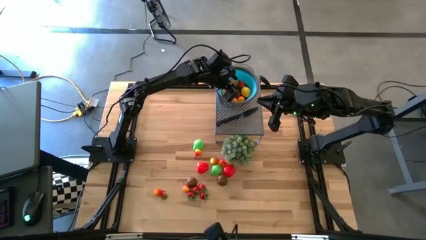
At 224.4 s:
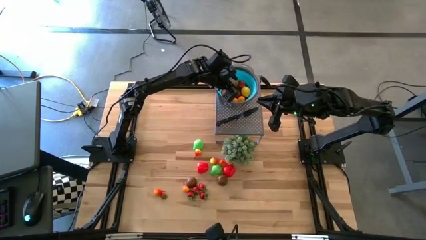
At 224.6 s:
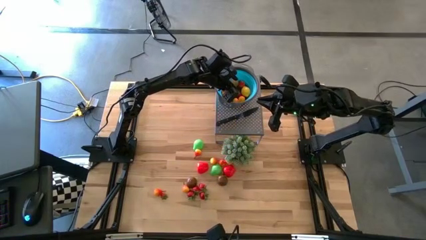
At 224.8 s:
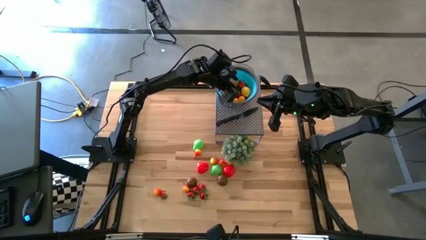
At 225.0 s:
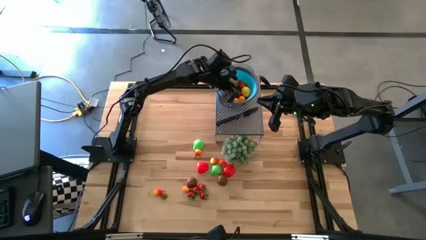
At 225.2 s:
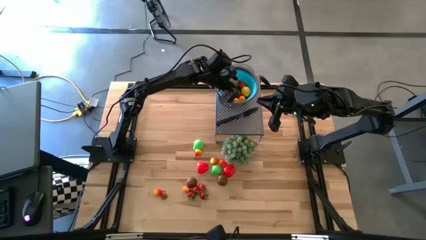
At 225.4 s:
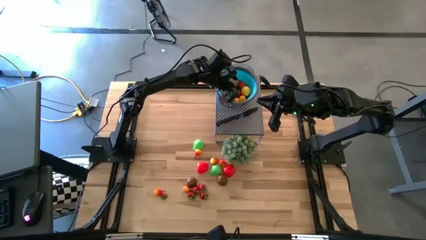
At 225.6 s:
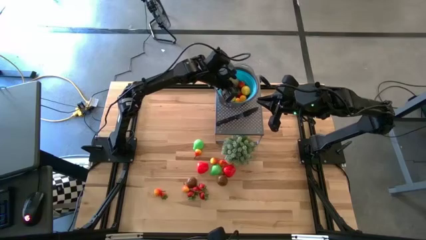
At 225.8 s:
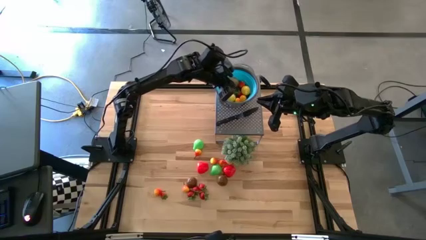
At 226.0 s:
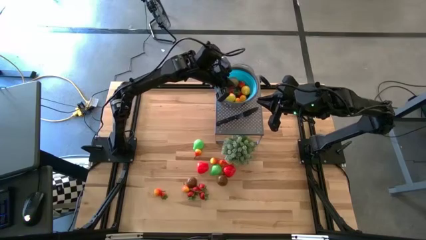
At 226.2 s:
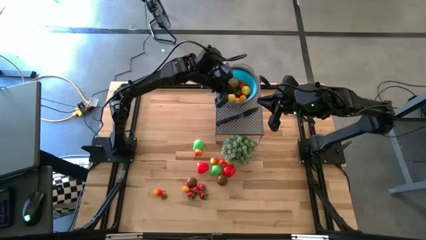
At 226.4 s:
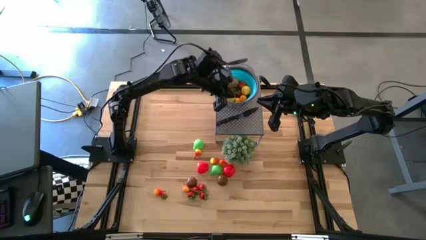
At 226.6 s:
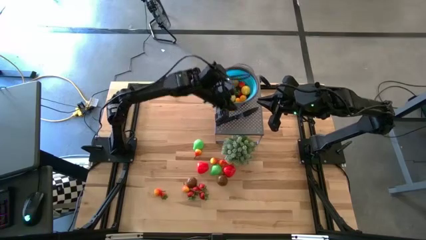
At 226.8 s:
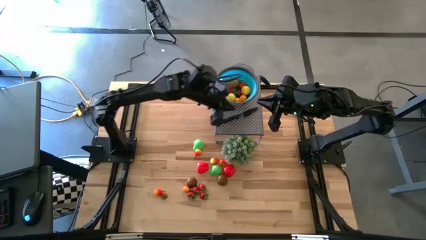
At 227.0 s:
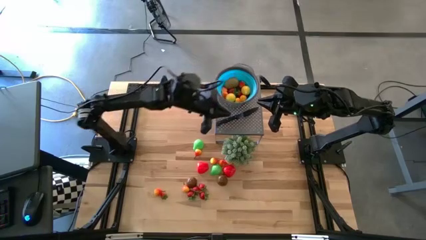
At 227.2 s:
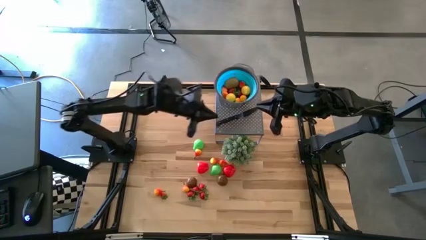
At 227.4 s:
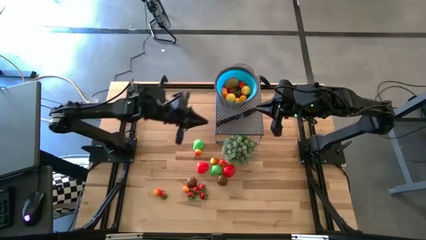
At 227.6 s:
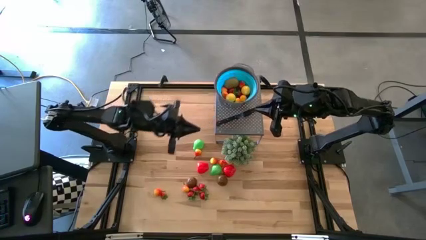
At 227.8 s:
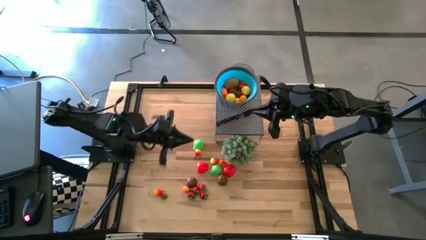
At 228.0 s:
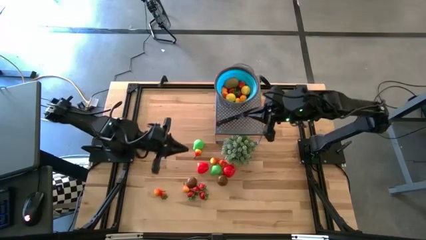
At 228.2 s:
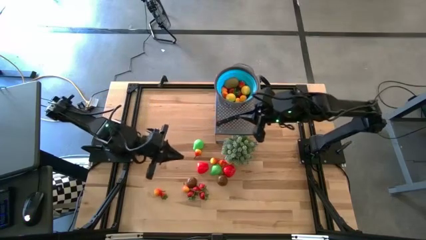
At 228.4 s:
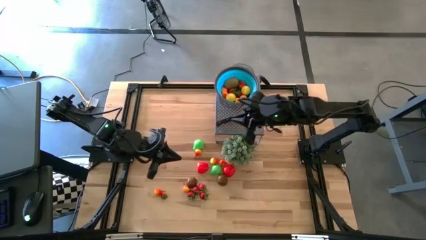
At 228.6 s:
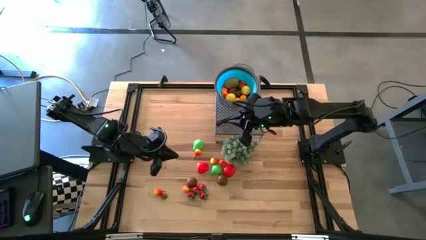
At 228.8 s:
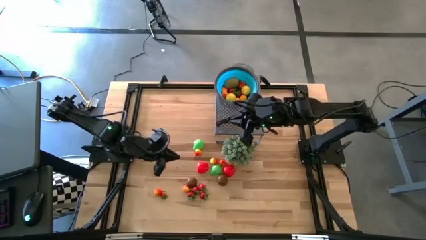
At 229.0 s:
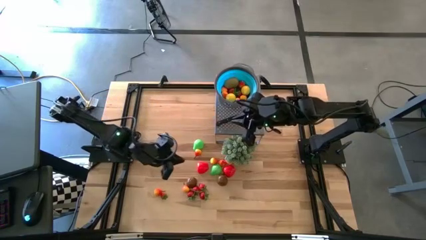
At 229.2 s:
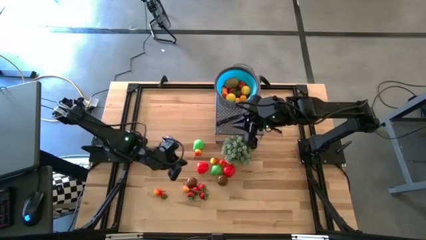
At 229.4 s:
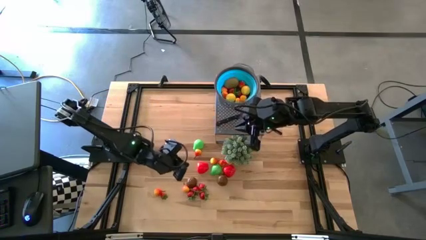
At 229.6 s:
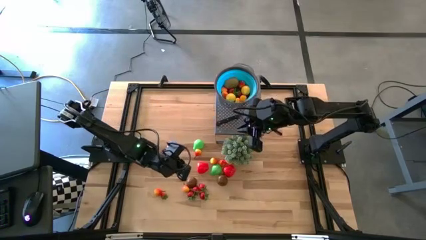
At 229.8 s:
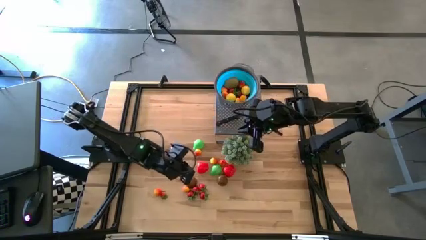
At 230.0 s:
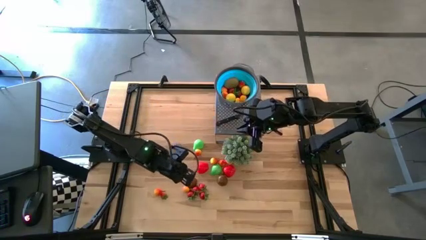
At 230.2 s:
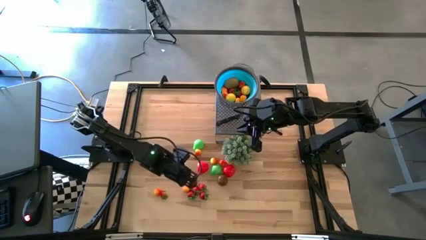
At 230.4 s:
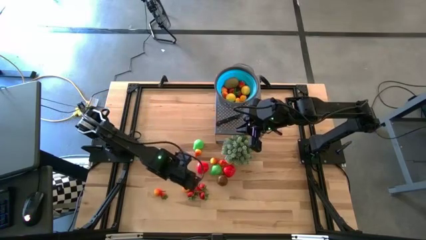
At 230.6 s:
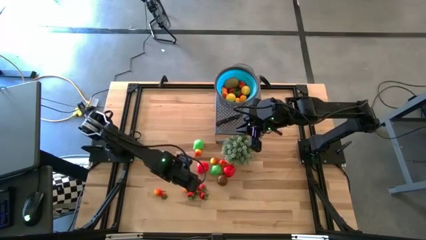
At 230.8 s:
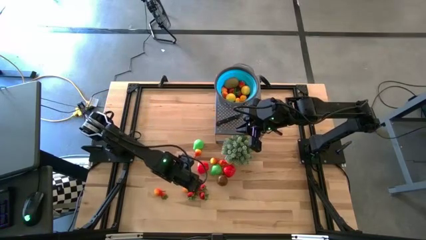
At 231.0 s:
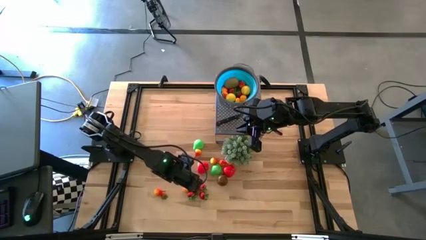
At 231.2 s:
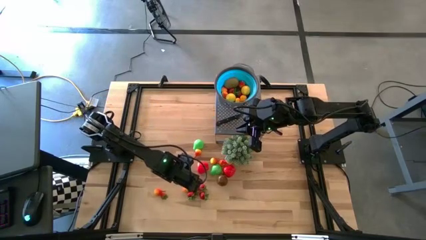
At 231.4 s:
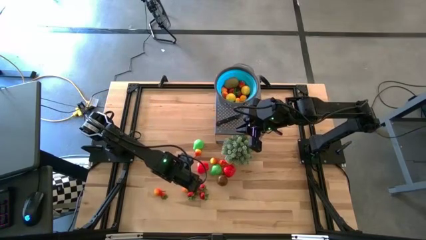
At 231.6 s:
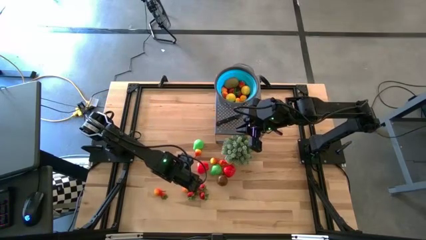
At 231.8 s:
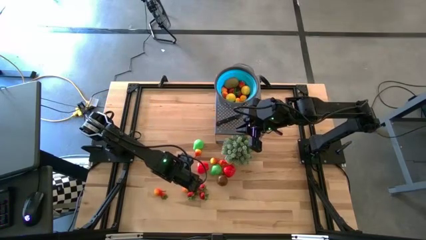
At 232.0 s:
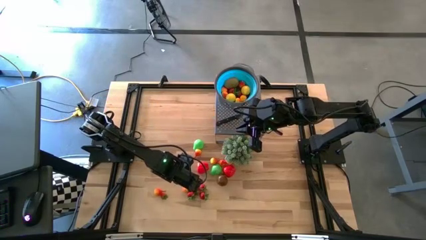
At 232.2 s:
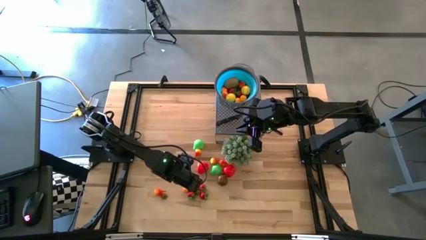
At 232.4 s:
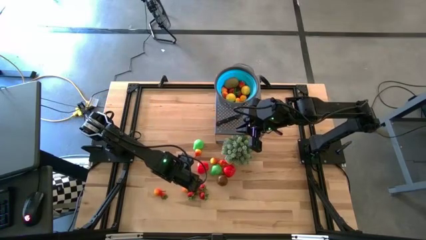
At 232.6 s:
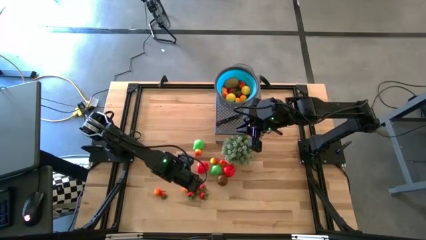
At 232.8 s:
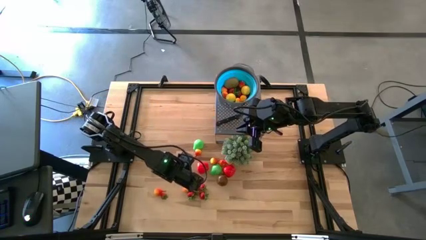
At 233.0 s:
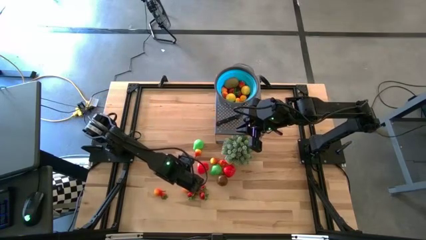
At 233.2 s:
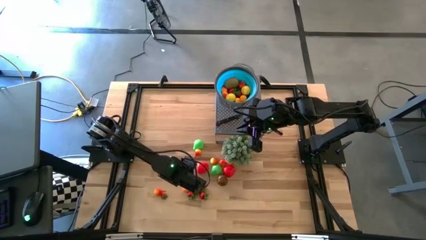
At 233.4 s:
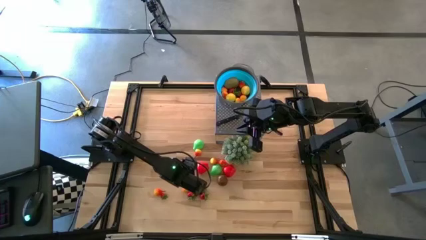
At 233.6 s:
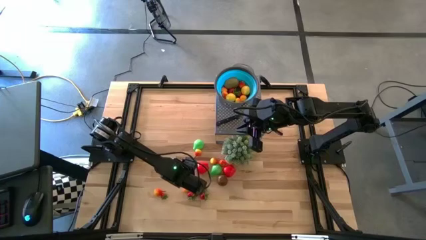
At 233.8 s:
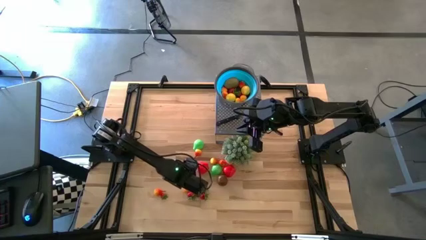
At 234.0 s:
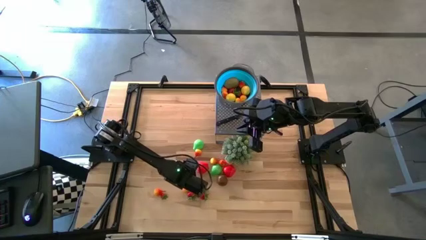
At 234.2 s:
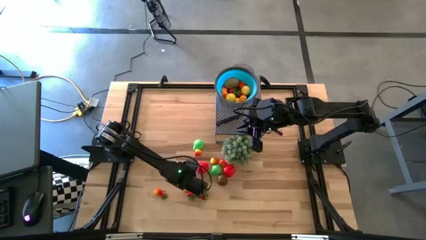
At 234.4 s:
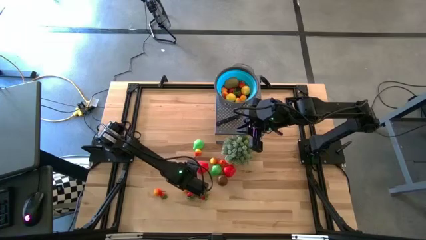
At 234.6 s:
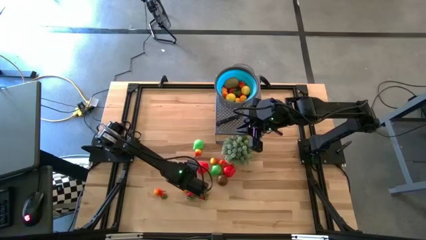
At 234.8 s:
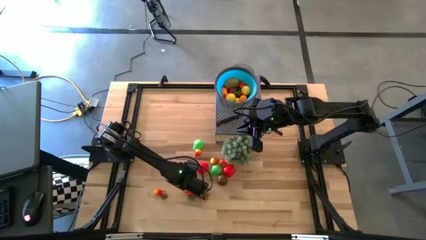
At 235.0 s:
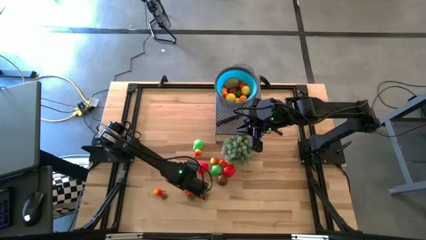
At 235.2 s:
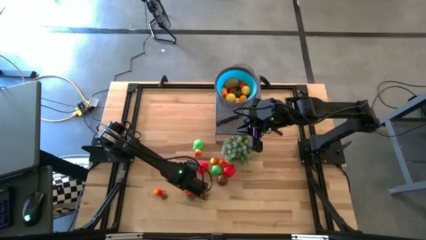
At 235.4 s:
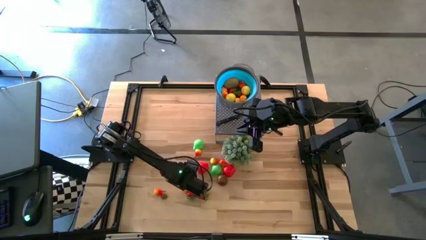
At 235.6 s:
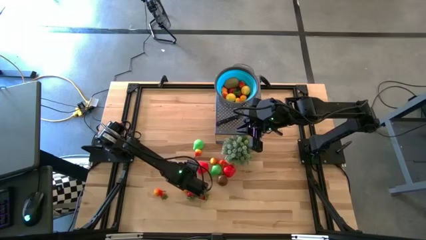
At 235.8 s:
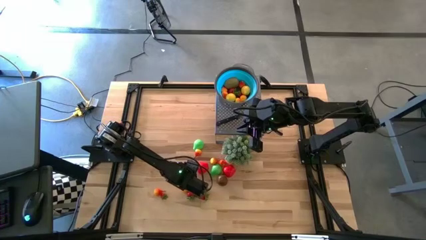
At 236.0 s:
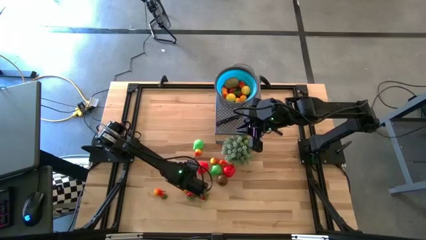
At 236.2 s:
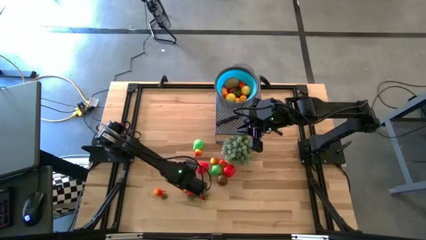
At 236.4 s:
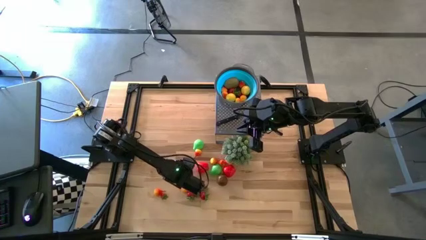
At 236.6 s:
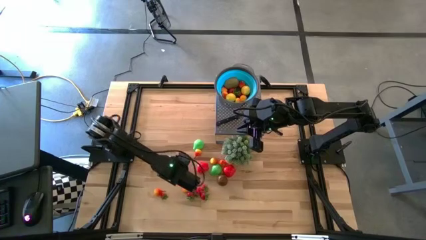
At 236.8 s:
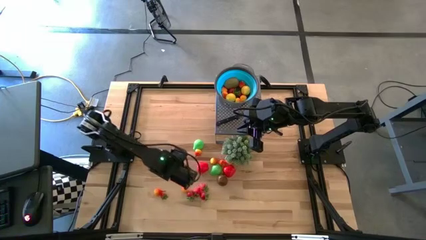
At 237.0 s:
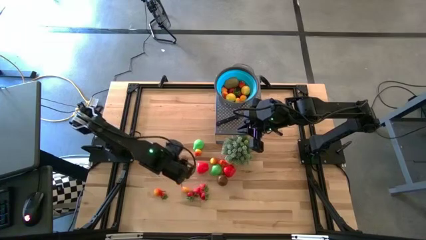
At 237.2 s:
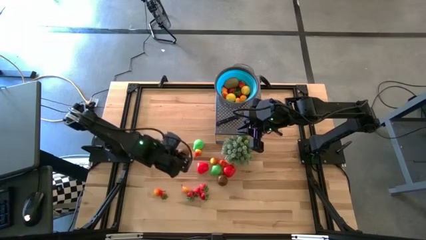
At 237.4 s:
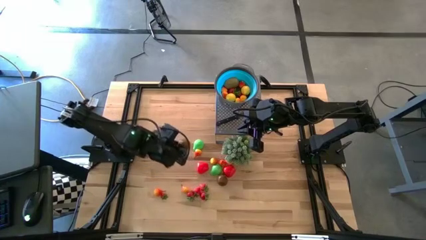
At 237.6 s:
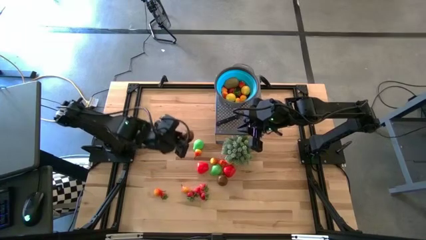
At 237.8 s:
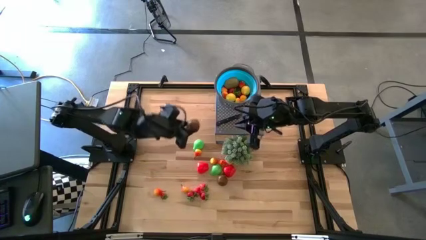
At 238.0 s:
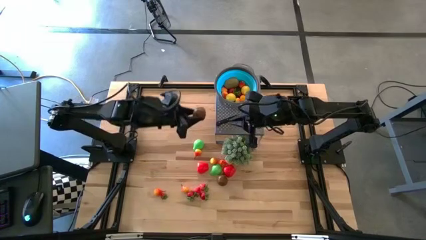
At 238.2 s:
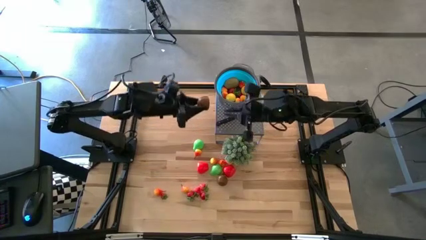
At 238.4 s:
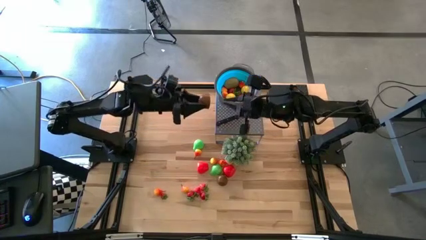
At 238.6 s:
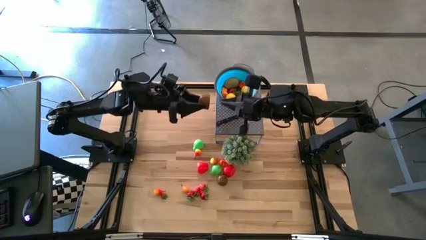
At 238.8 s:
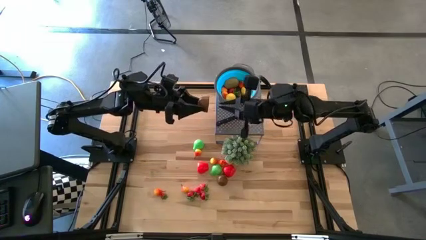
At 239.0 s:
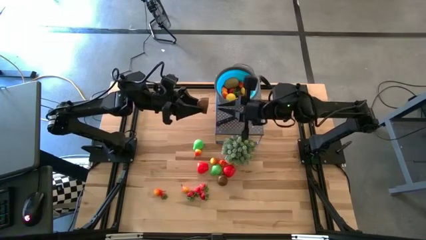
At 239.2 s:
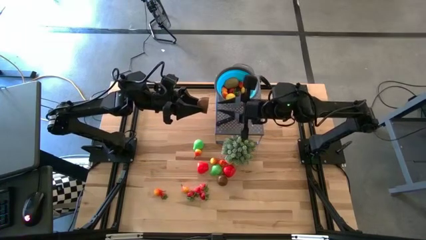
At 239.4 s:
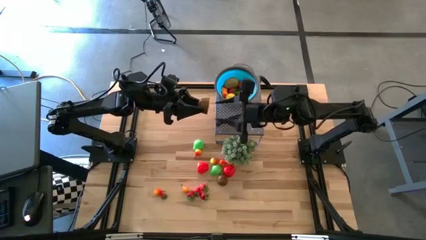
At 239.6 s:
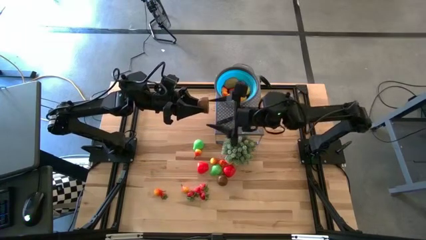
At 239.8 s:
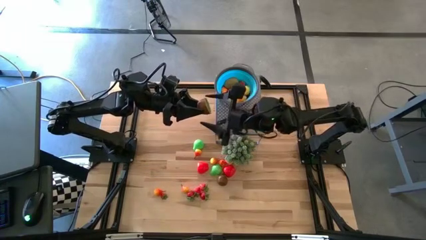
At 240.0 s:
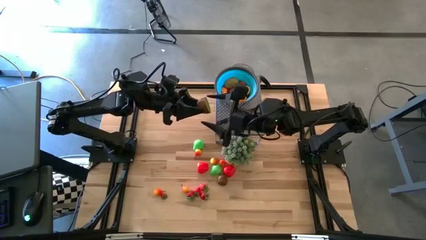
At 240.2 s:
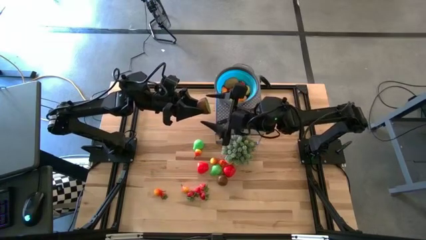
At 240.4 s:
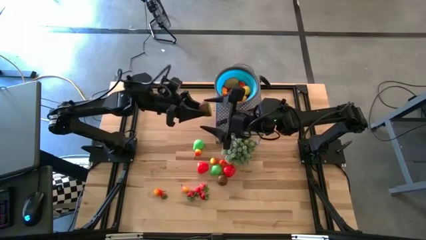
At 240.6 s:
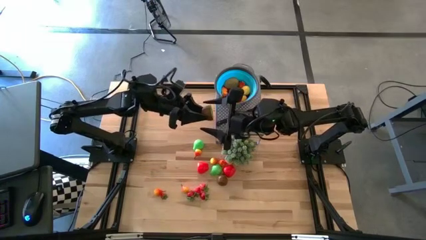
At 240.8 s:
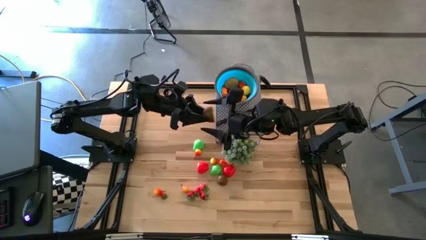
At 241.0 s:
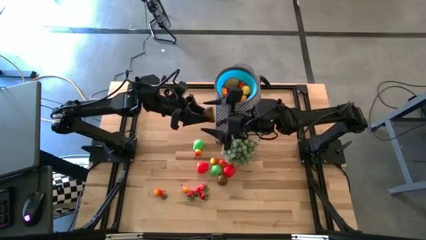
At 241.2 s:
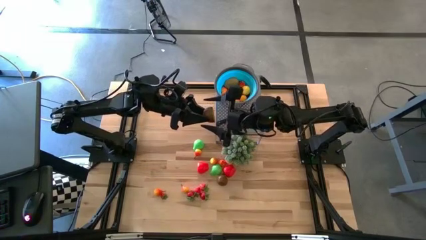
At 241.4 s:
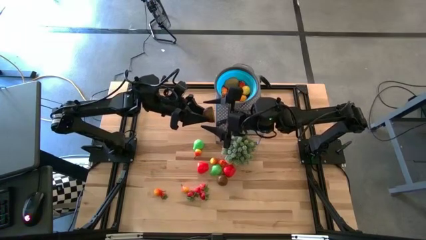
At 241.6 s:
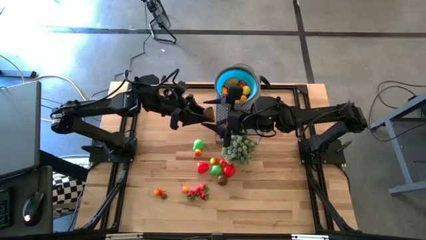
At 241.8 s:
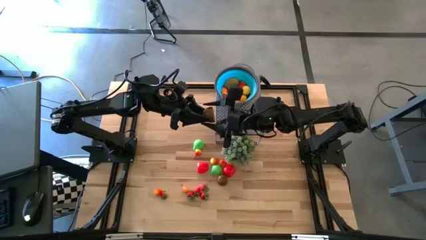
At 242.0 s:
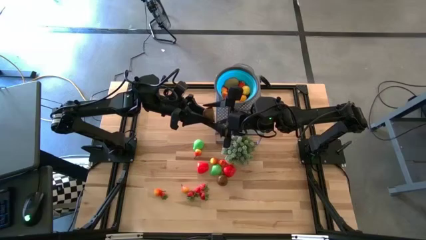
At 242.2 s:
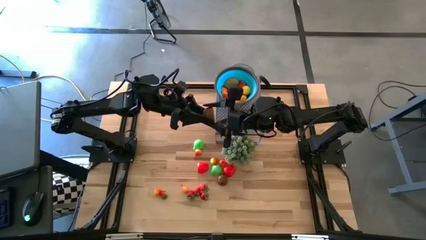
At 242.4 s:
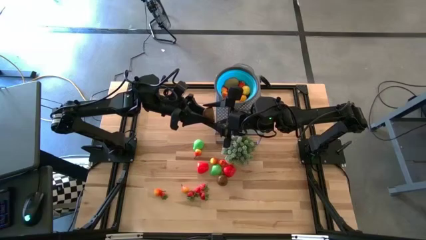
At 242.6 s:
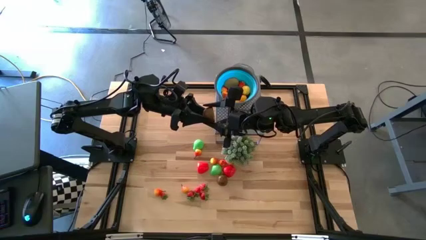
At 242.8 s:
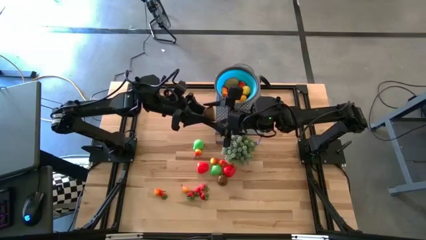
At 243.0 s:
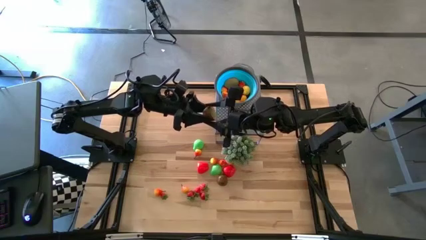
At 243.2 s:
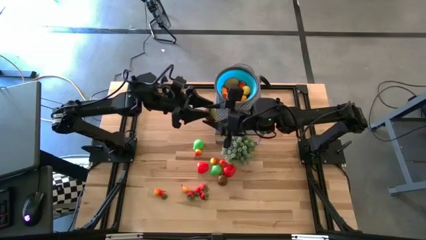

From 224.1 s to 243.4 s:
Task: Pick & Place Fruit
Put the brown kiwi into the blue strainer bowl
